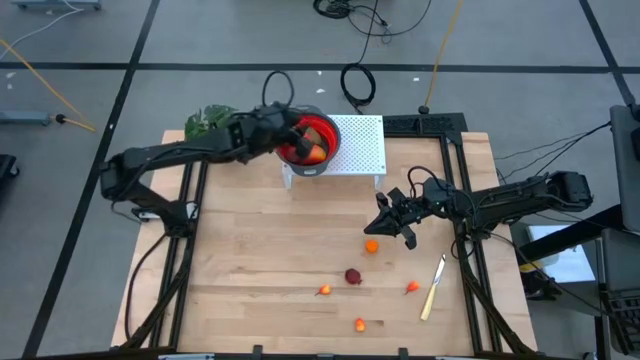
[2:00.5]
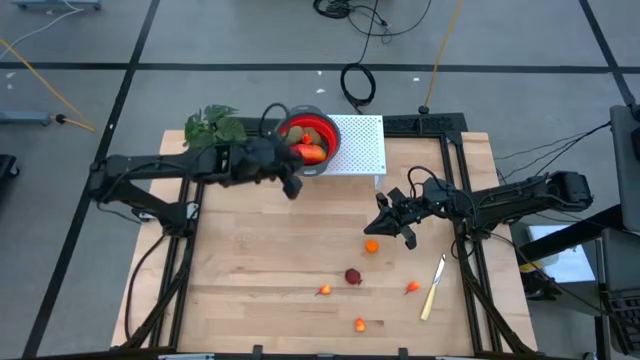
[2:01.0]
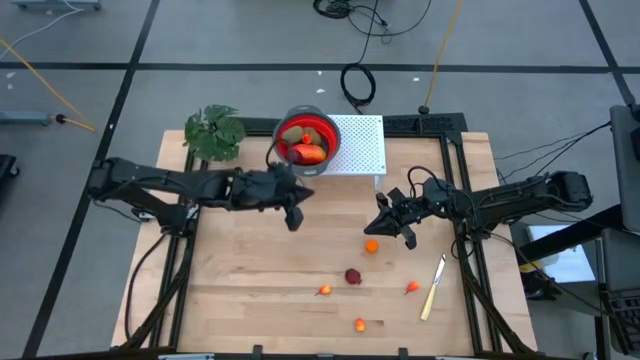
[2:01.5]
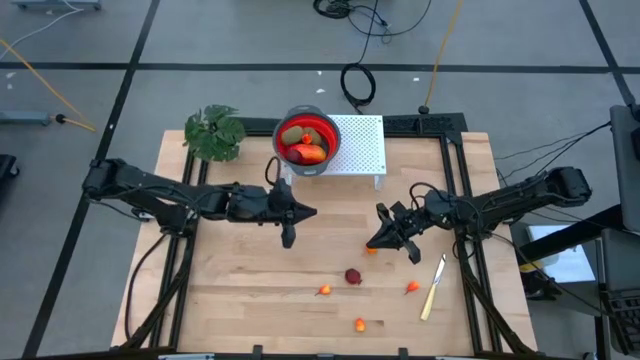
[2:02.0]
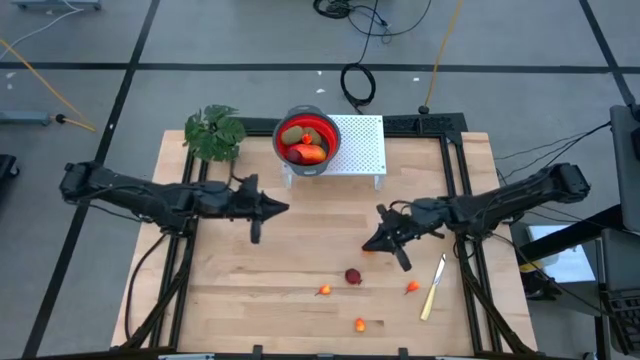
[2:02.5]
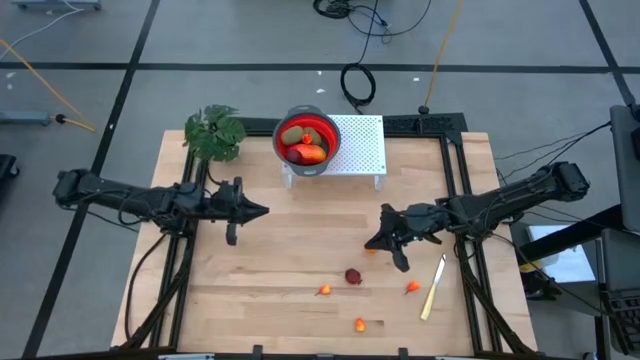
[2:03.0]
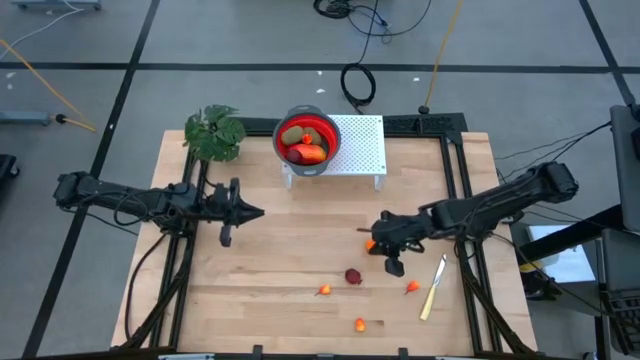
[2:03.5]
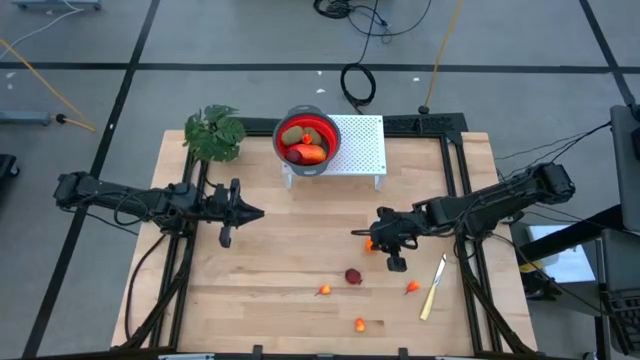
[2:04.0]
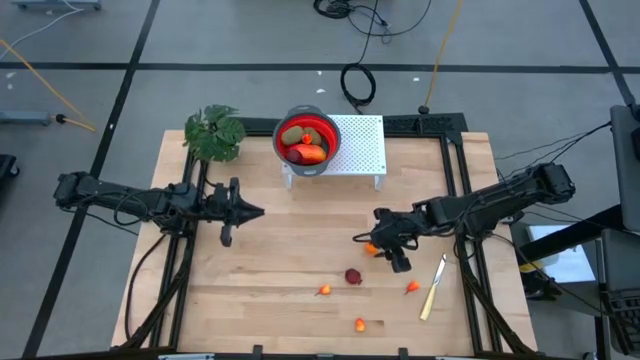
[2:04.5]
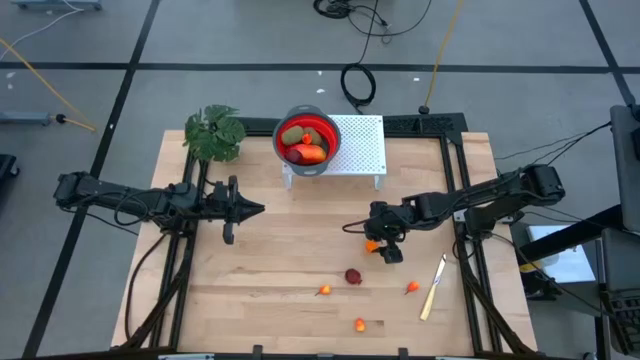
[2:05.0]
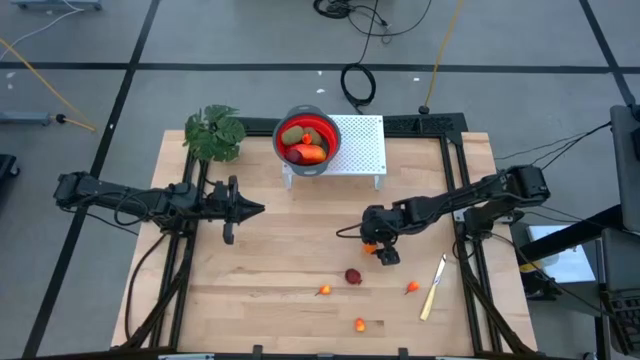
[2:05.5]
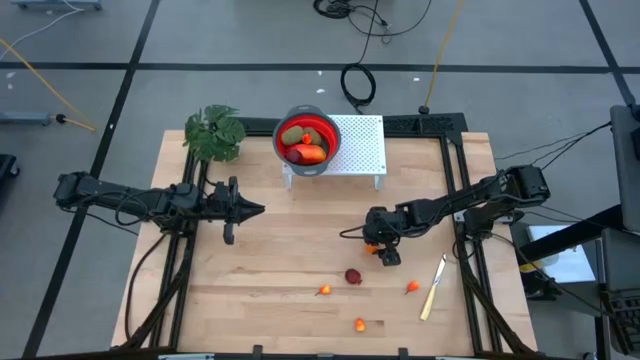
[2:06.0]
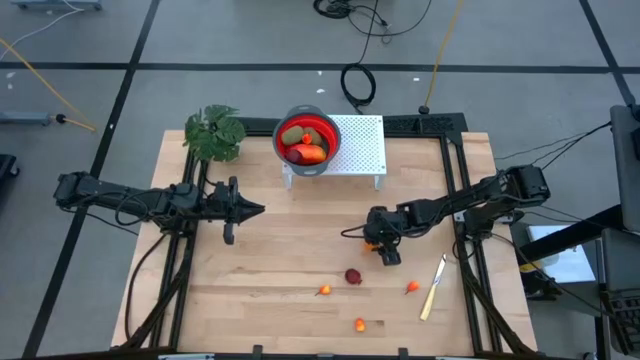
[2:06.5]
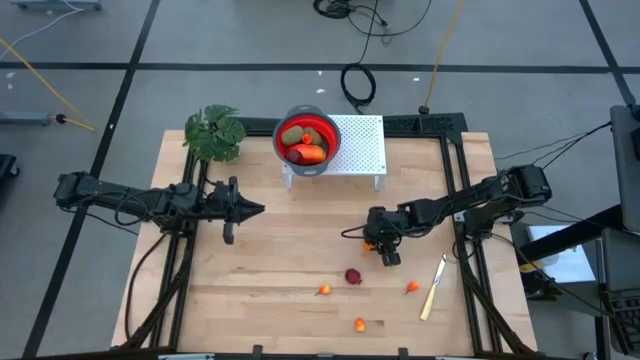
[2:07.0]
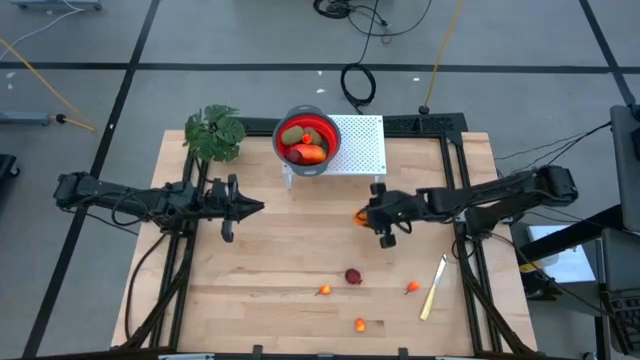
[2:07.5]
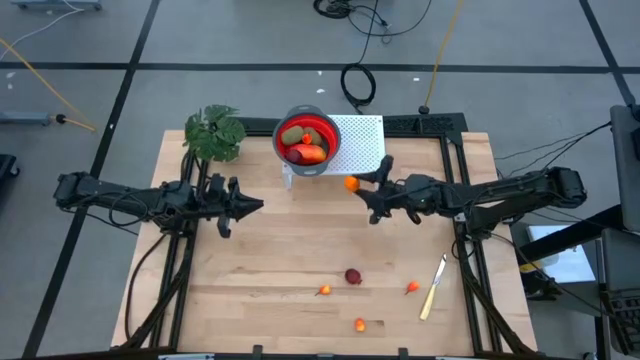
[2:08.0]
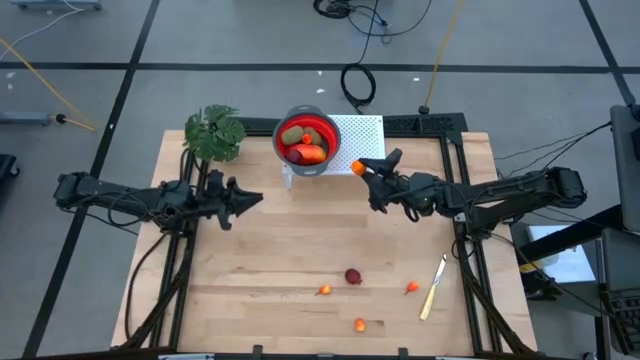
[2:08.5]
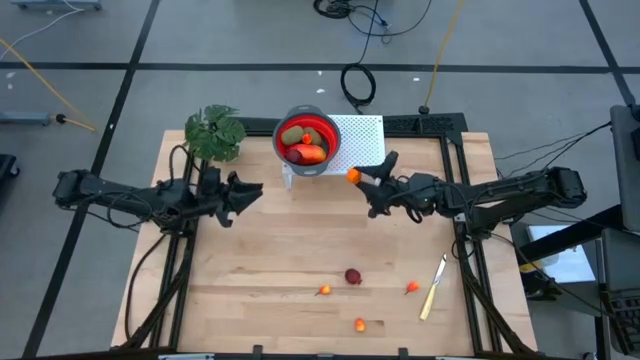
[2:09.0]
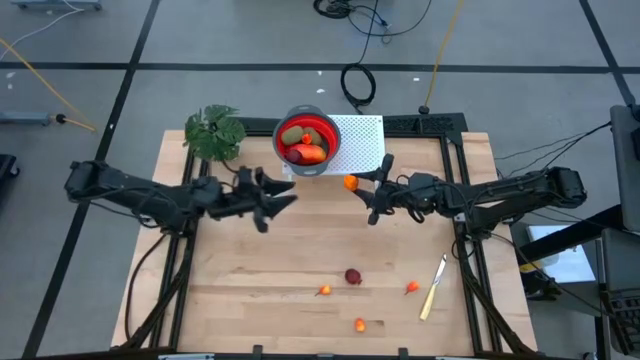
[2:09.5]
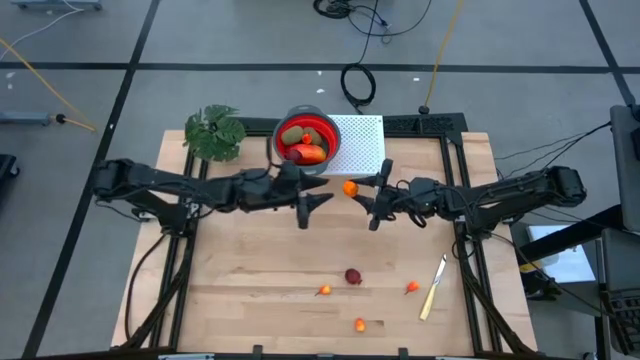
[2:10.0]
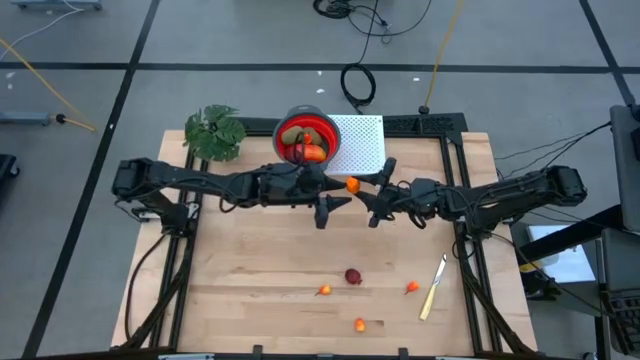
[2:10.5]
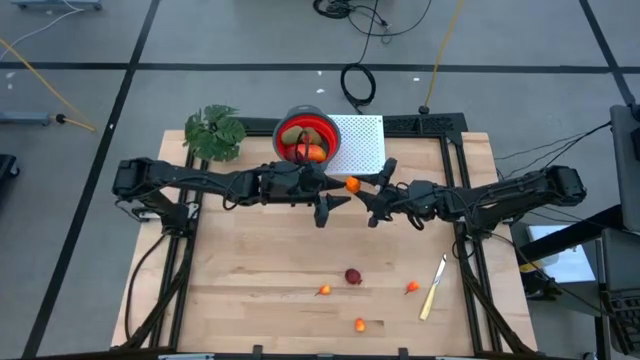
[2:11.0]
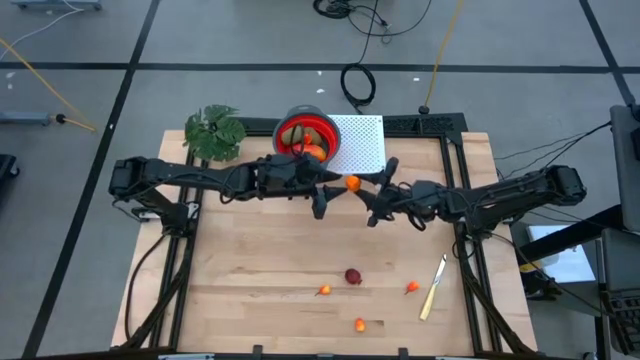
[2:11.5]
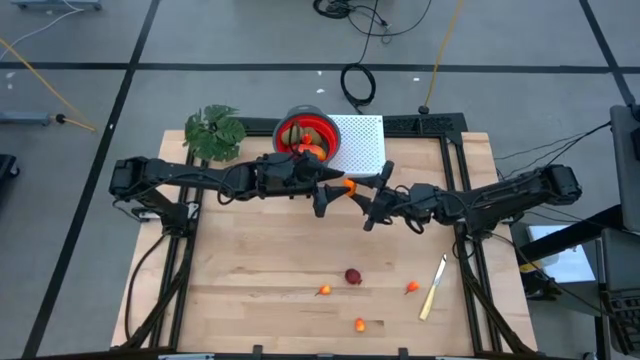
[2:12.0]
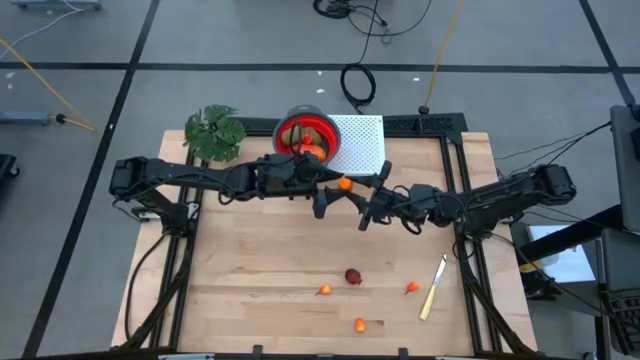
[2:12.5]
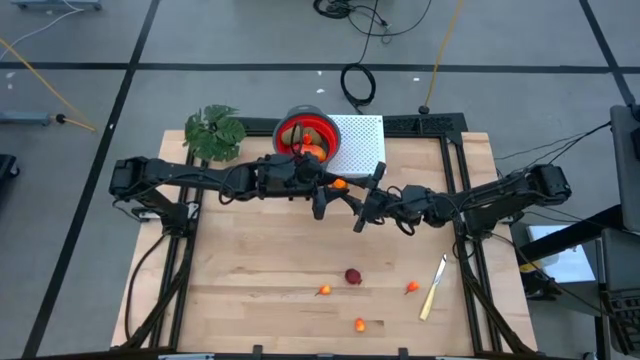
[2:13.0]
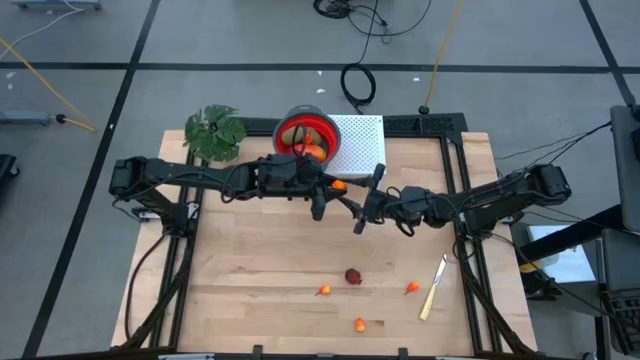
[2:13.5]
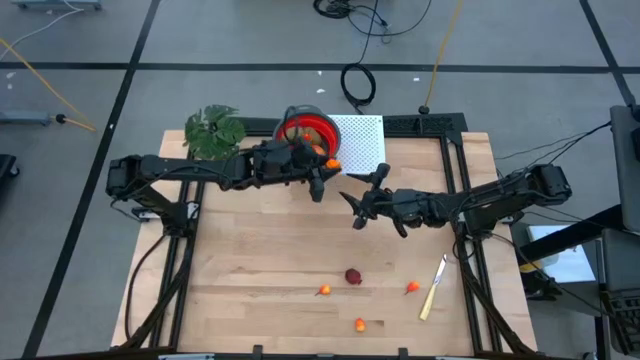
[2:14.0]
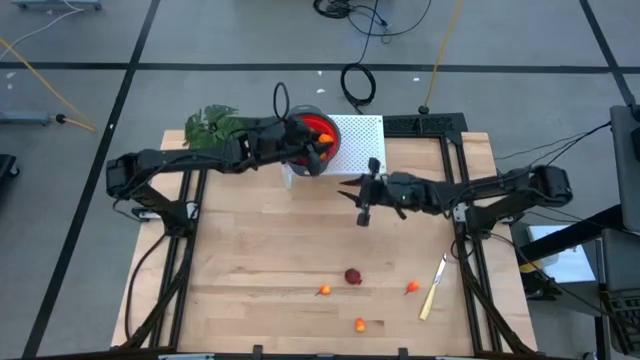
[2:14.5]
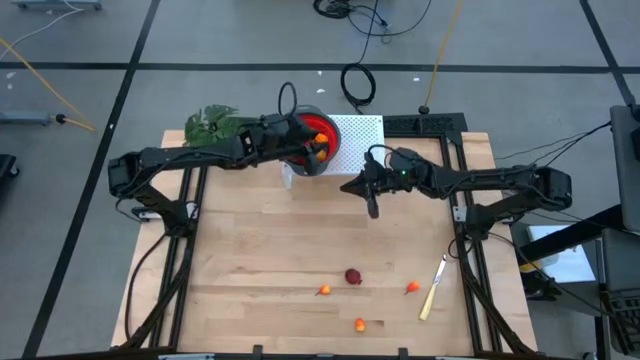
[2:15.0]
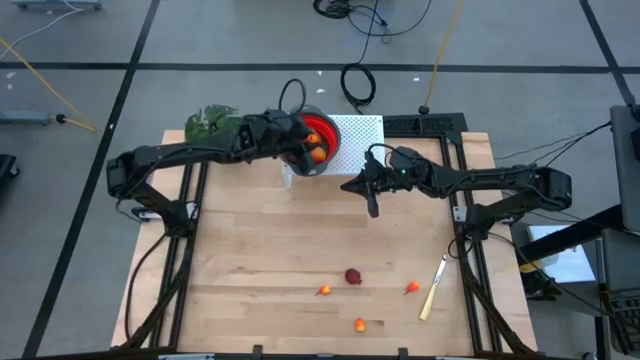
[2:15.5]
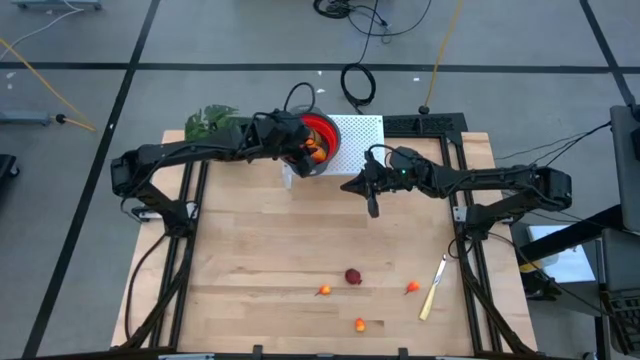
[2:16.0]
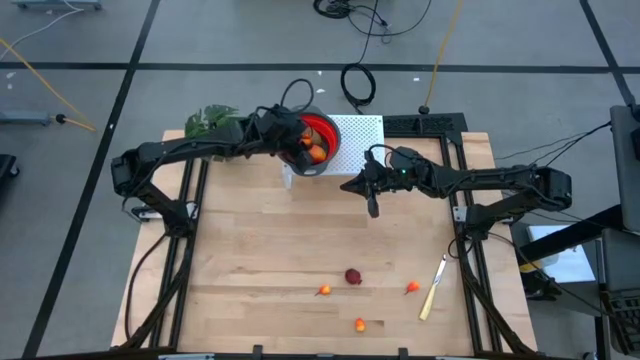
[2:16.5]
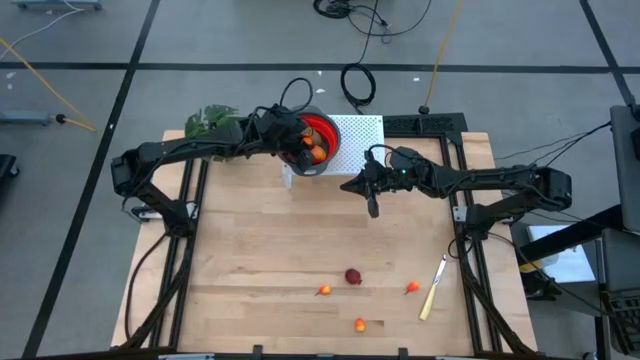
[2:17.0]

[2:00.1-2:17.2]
Task: Pick & Place Fruit
Put the orange into the red strainer bowl

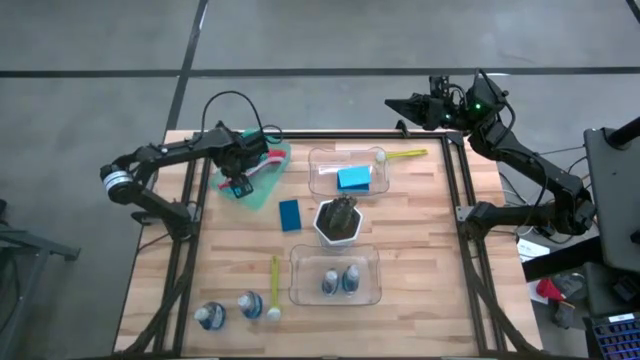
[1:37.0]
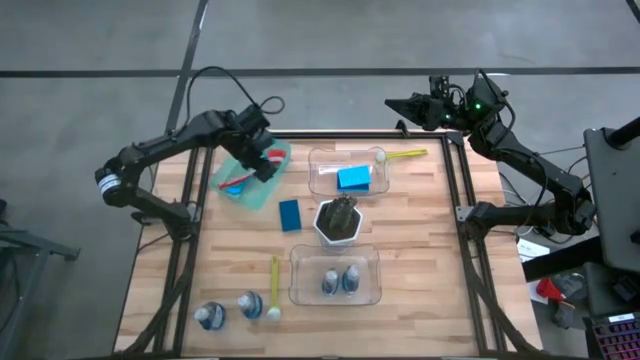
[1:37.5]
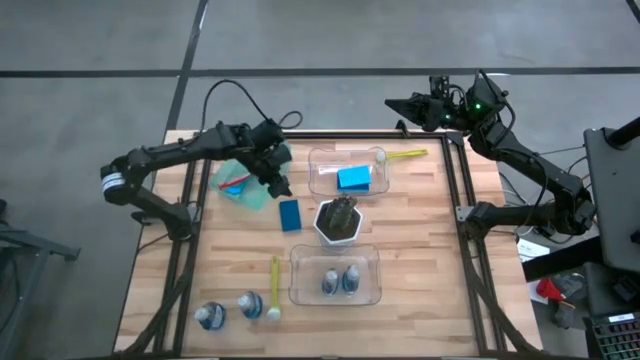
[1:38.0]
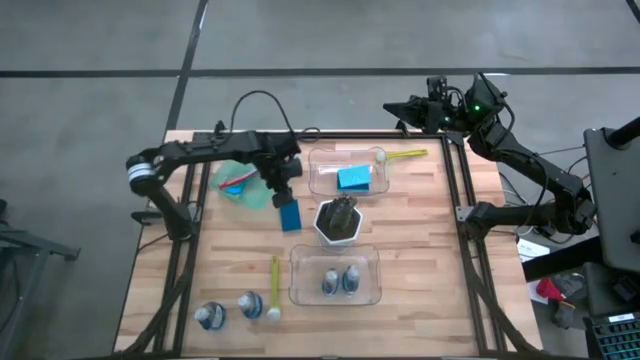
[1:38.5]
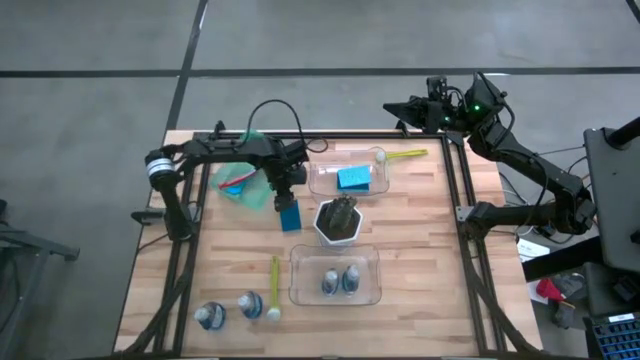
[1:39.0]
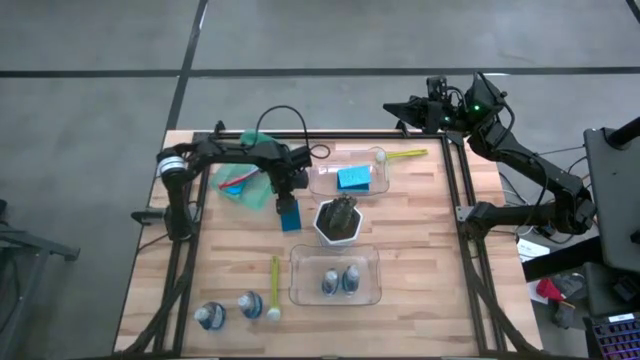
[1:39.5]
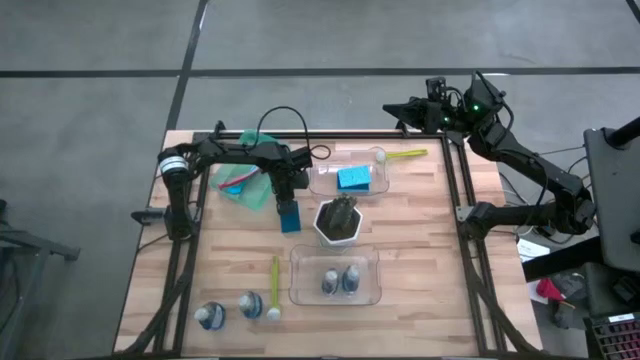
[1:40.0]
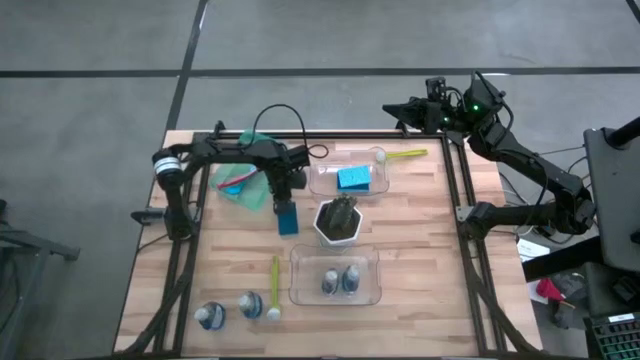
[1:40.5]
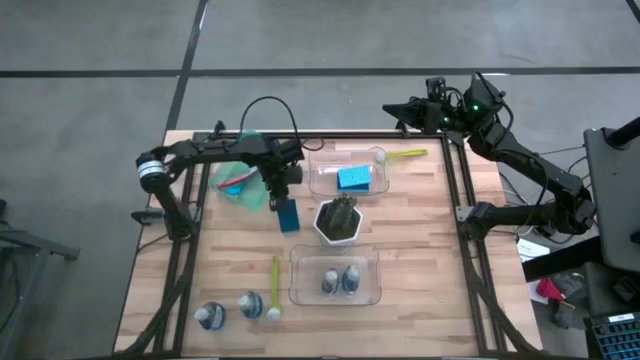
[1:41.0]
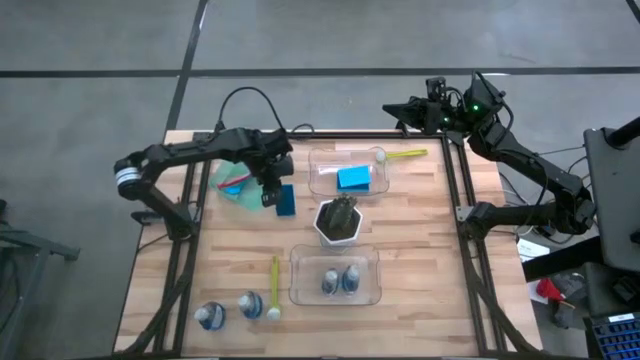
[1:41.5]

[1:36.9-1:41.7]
Task: Pick & Place Kitchen Sink Supplies
Put the blue sponge wipe into the top transparent bin
